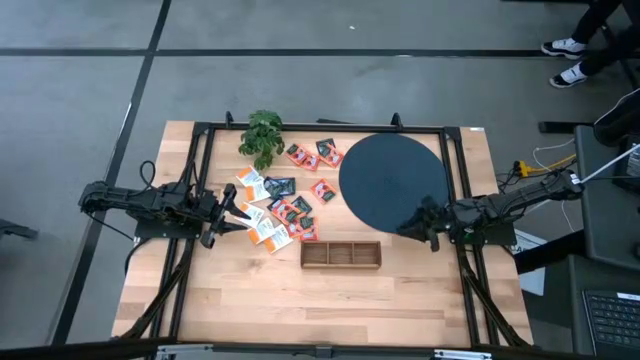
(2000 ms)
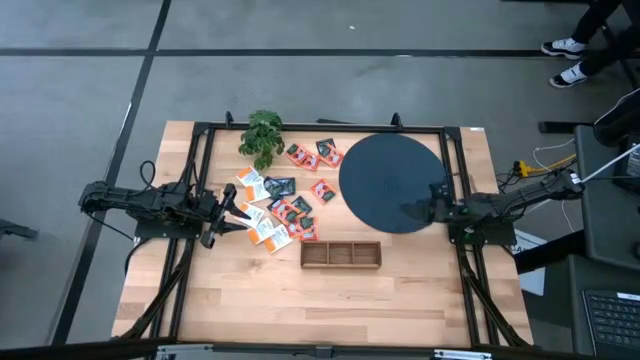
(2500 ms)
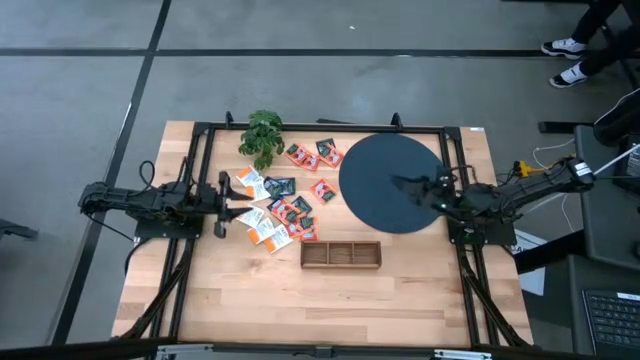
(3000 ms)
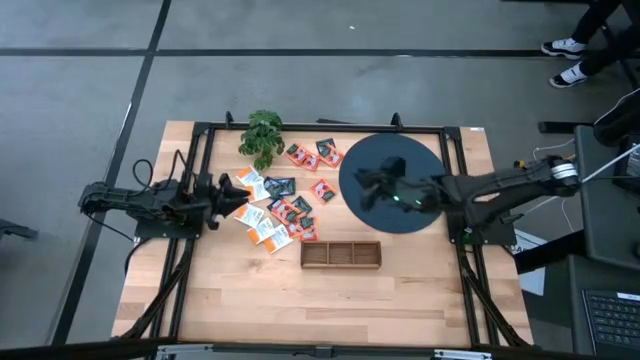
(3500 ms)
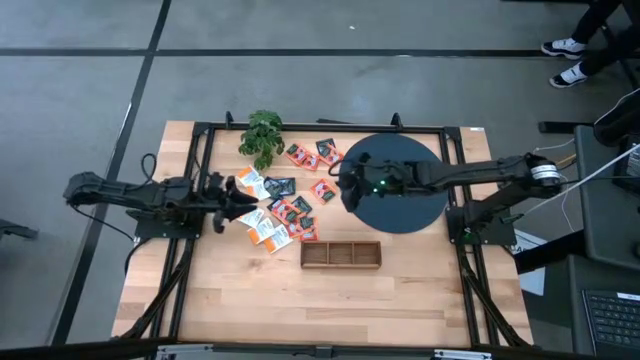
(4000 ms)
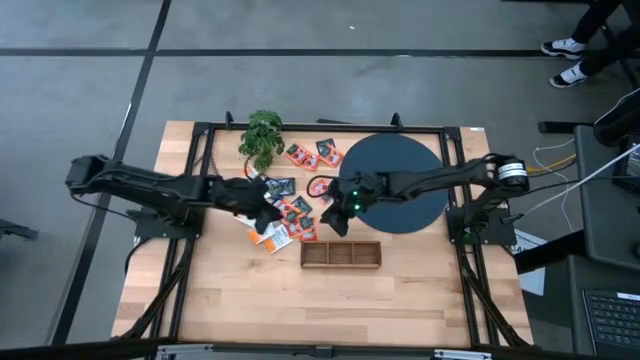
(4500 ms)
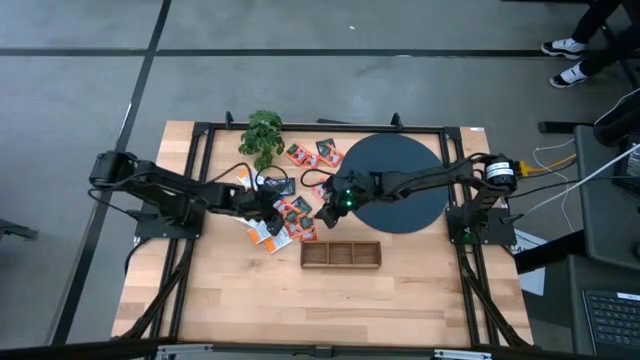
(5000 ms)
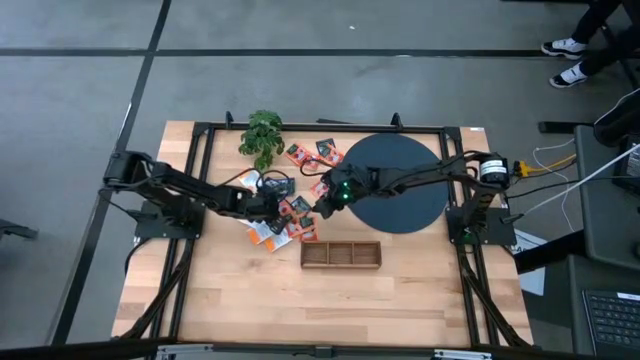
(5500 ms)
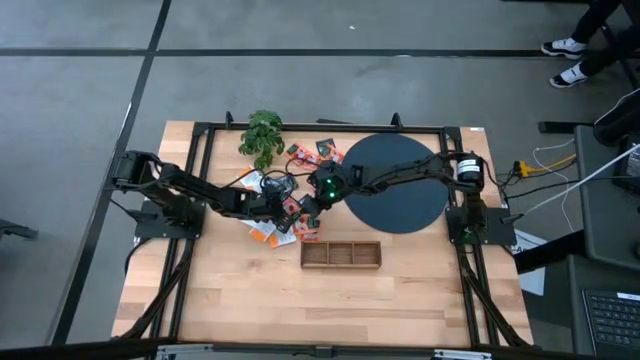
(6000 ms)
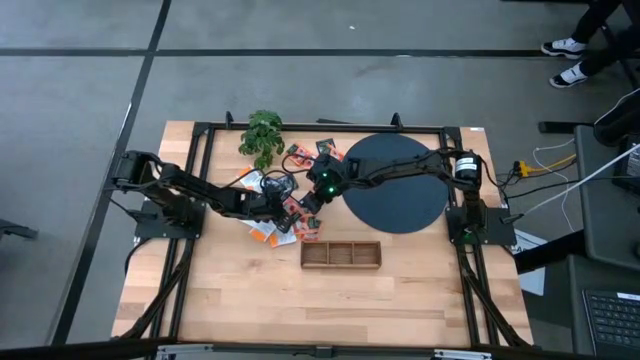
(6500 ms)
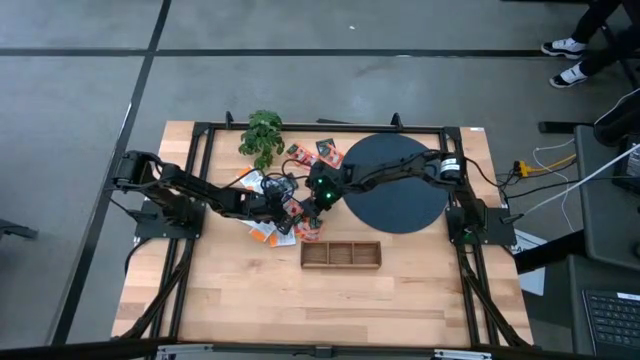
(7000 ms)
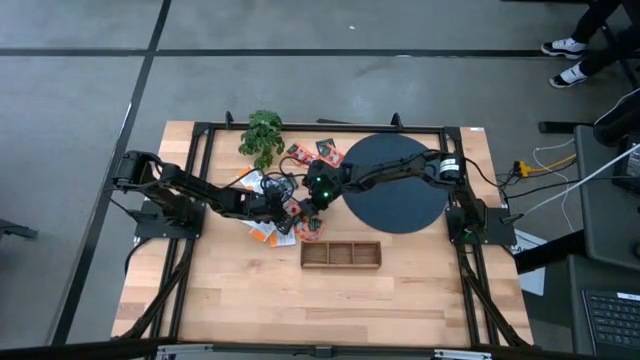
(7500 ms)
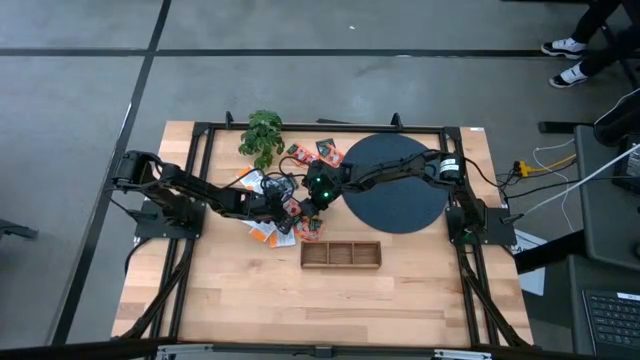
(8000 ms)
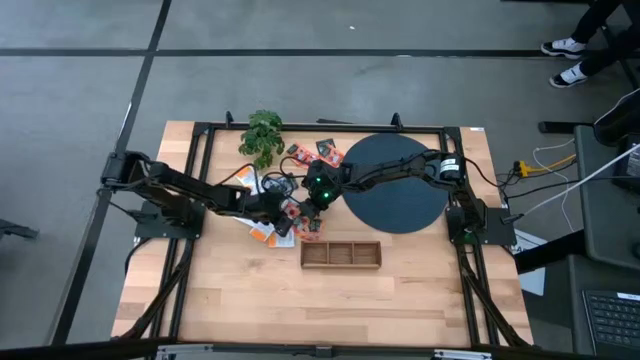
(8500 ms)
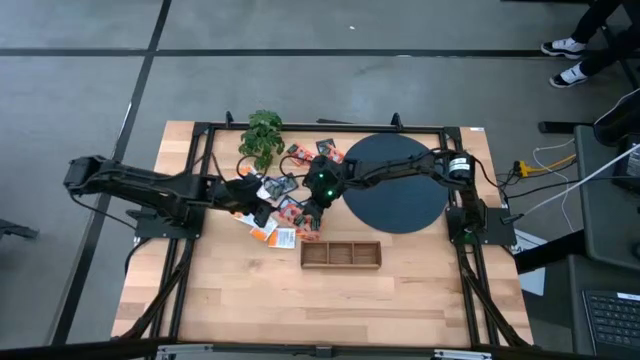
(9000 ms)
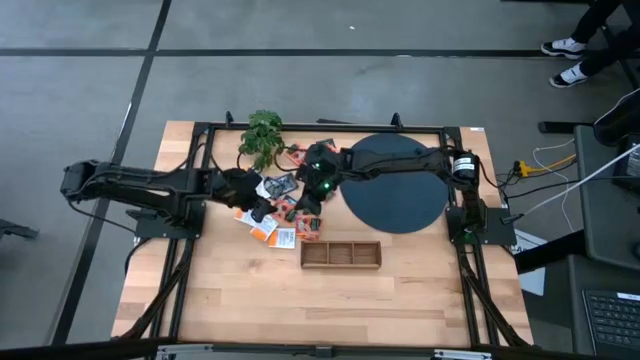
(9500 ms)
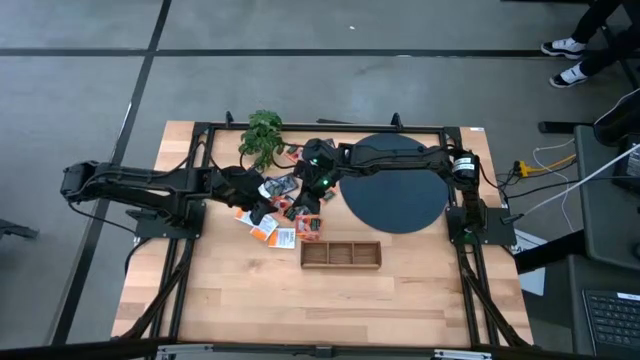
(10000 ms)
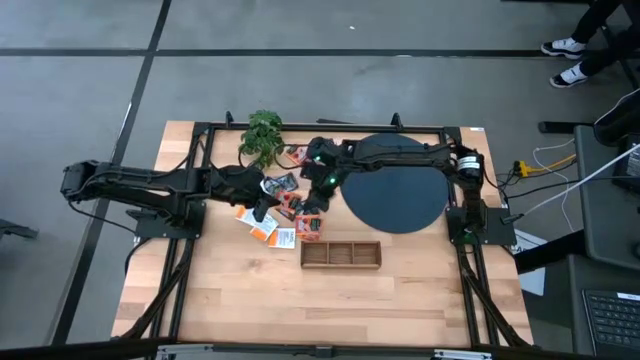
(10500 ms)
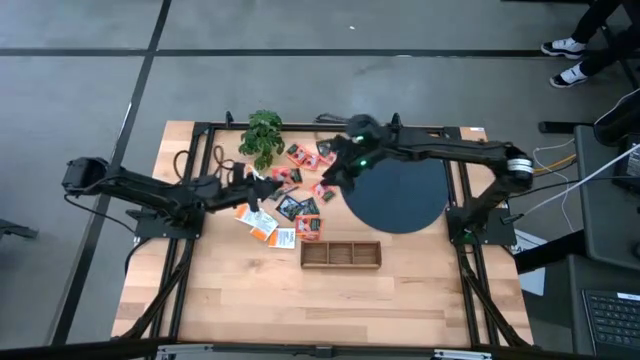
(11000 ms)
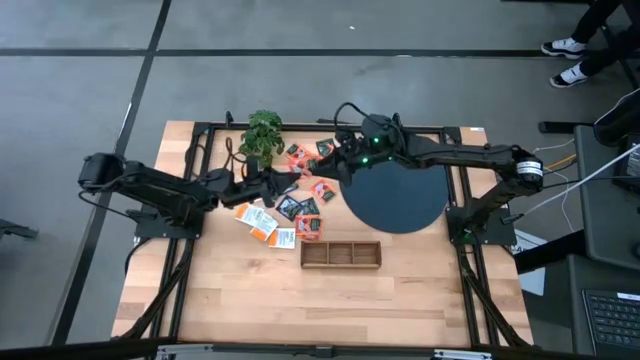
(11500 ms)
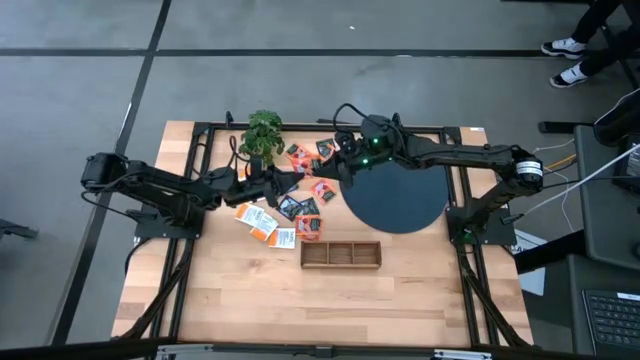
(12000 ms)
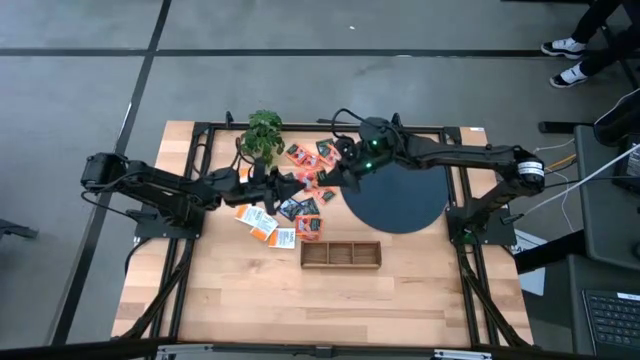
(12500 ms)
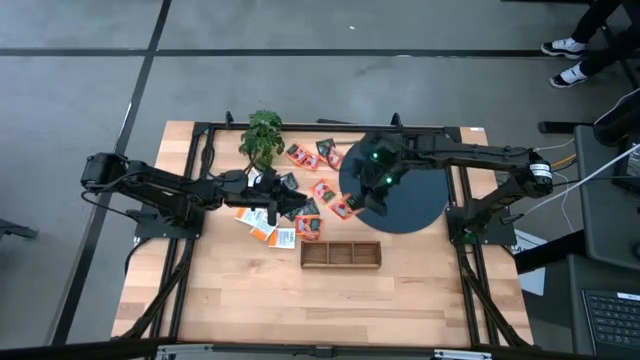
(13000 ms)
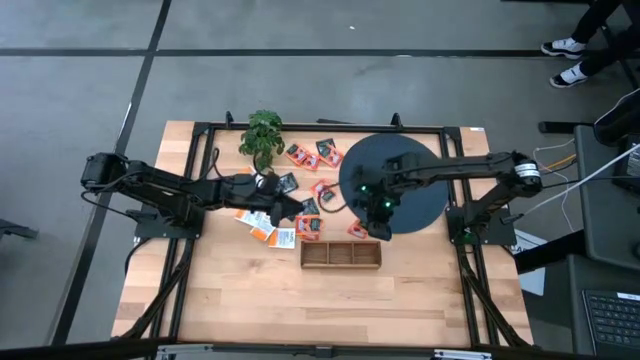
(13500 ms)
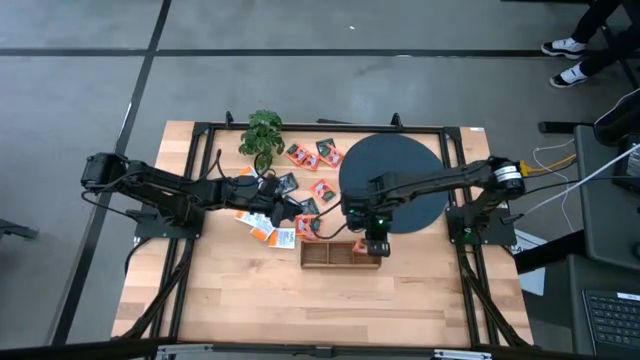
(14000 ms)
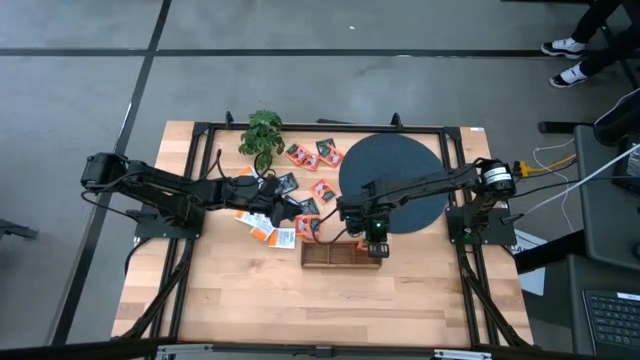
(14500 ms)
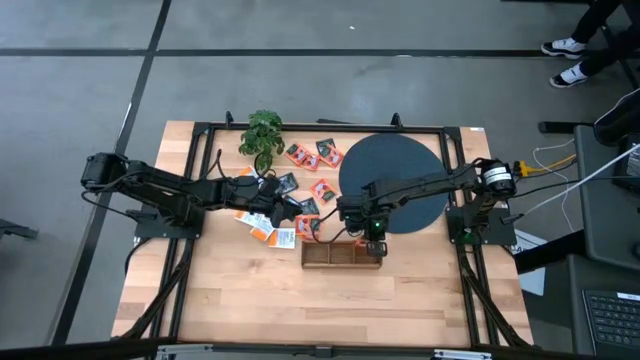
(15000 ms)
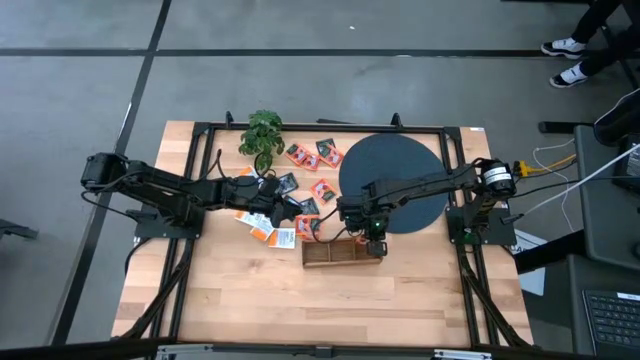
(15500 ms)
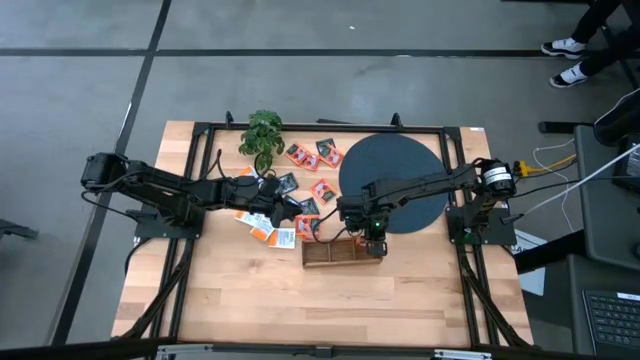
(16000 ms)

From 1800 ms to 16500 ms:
Task: Pick & Place Tea
Put the orange tea bag into the right section of the wooden organizer

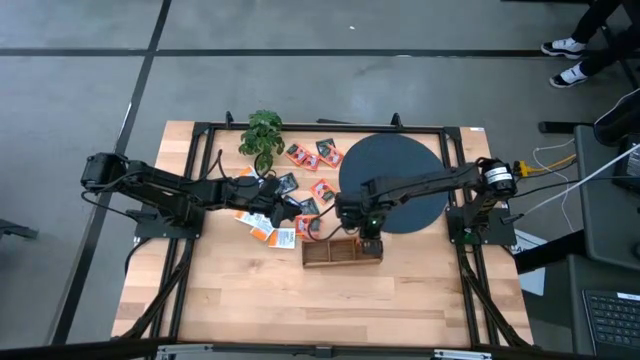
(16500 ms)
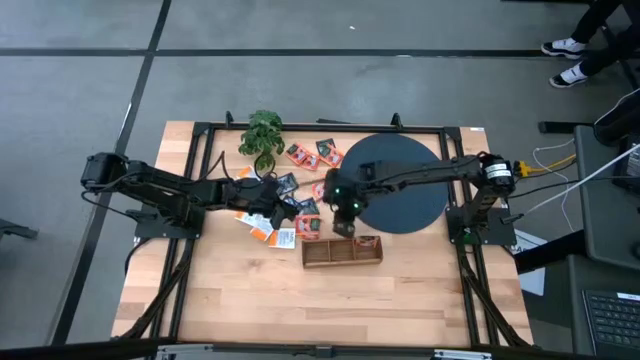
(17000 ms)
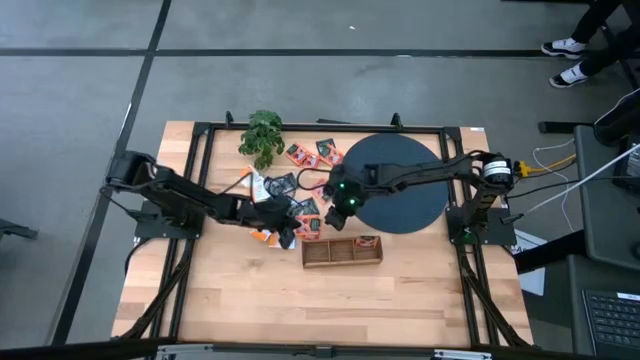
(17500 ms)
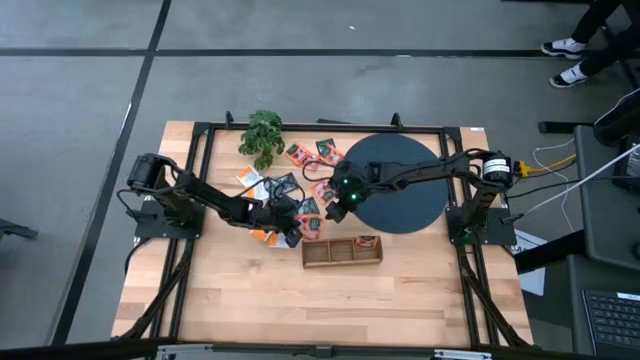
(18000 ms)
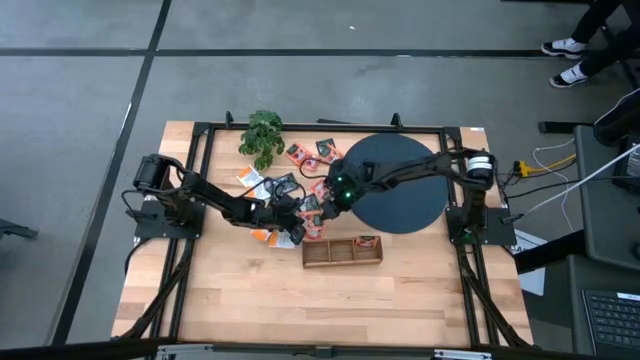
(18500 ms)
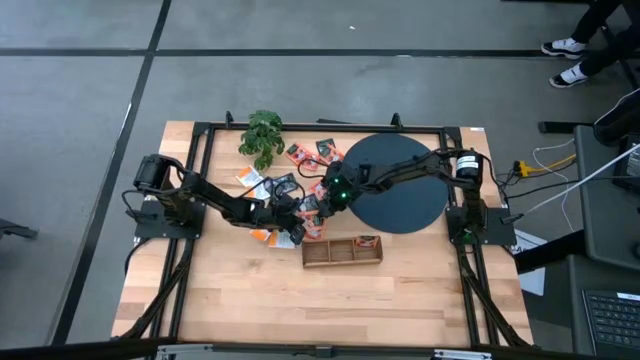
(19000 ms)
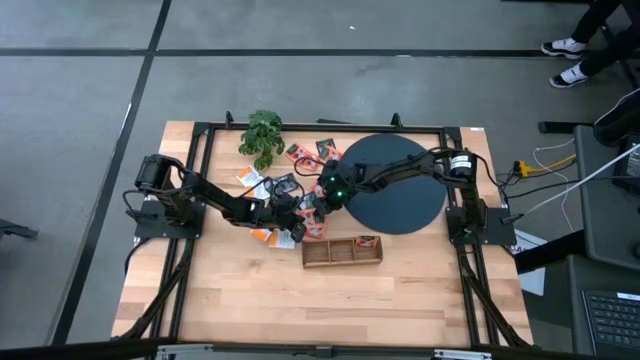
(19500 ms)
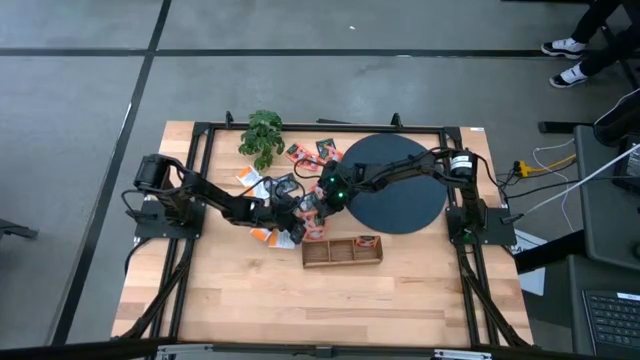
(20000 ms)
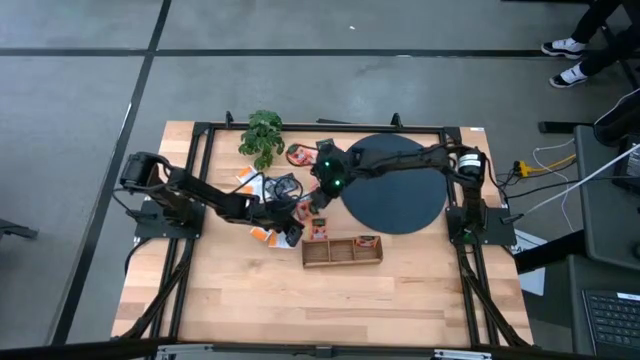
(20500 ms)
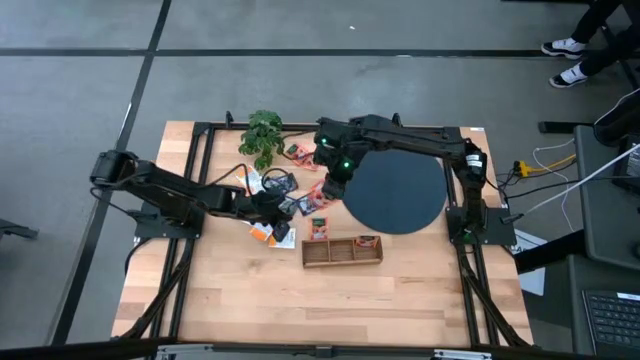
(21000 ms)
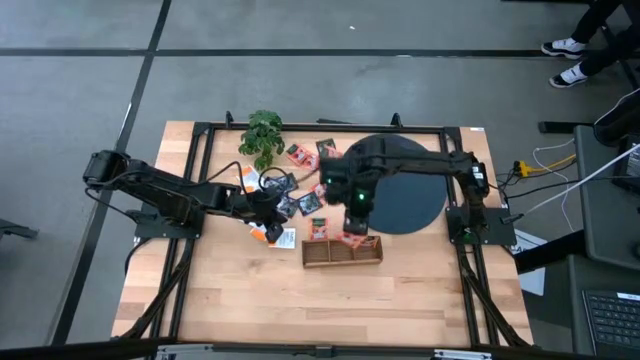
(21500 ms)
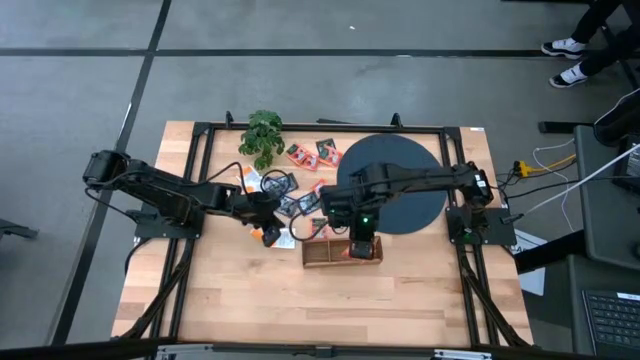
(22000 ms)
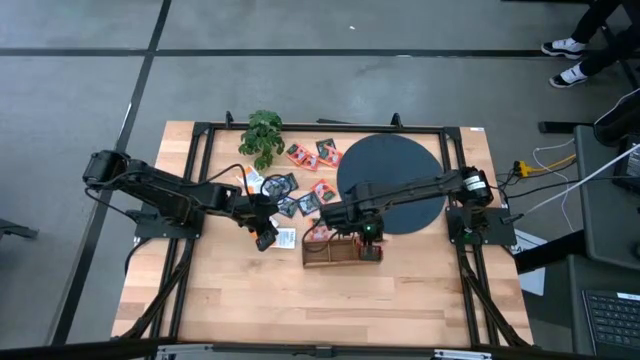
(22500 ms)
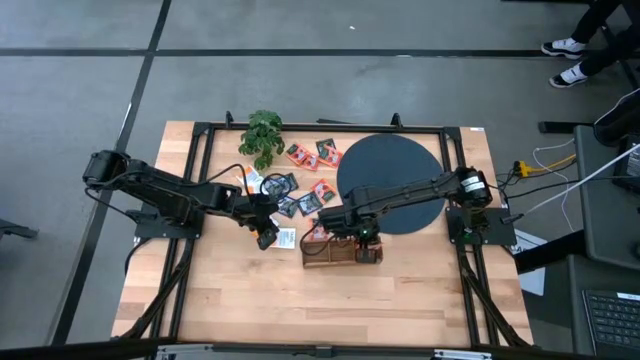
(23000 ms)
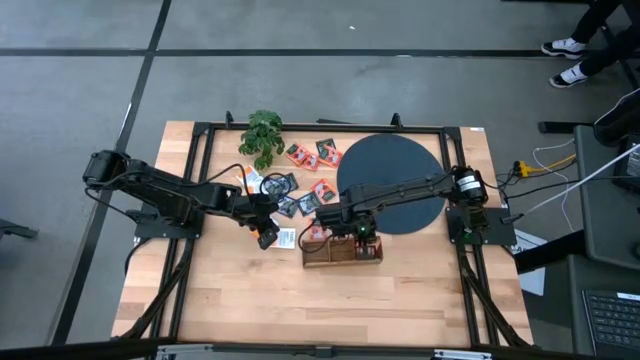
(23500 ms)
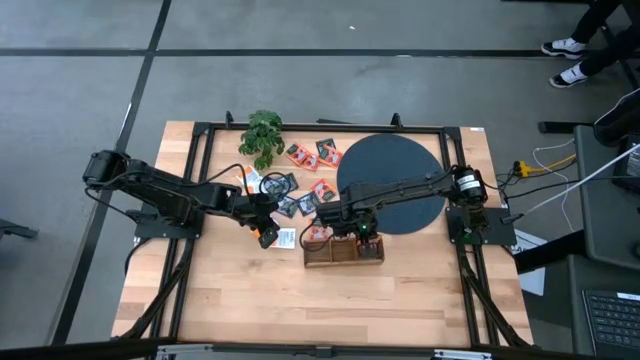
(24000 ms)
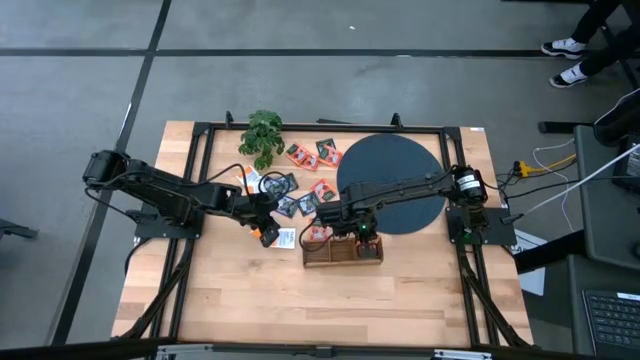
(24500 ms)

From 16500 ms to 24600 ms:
Put the orange tea bag into the right section of the wooden organizer
